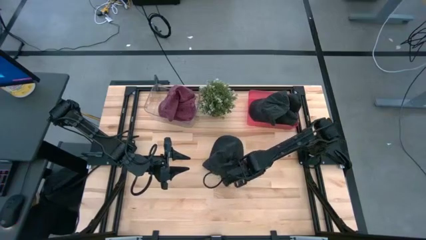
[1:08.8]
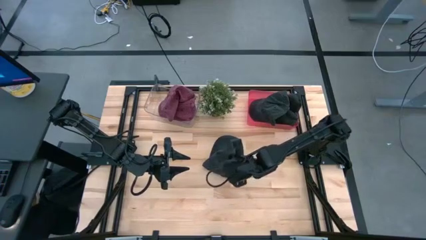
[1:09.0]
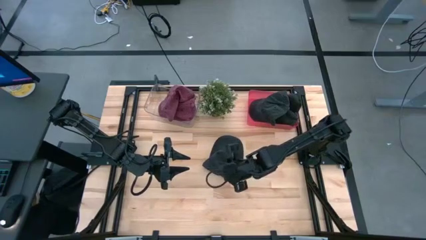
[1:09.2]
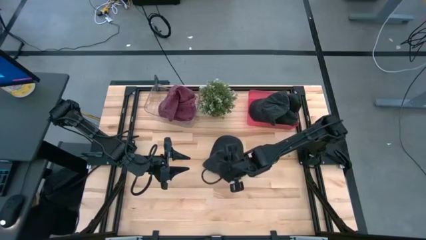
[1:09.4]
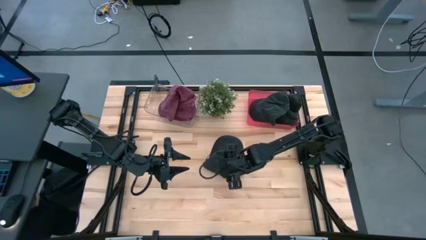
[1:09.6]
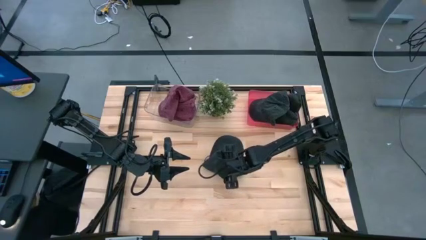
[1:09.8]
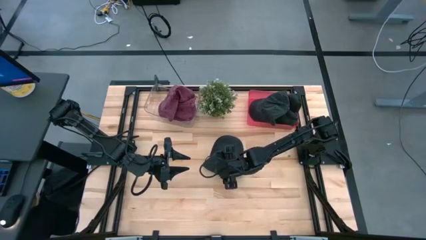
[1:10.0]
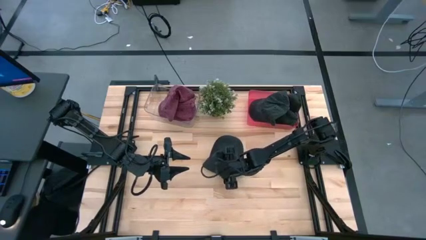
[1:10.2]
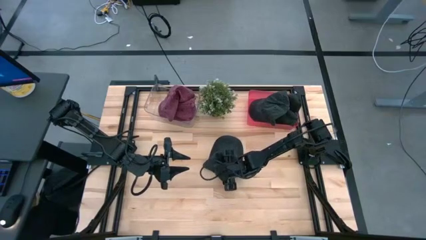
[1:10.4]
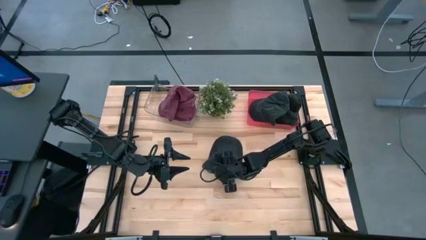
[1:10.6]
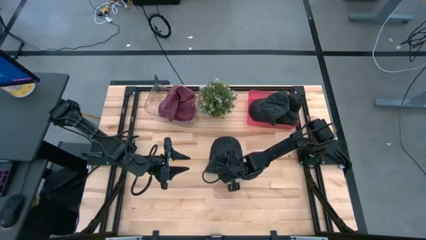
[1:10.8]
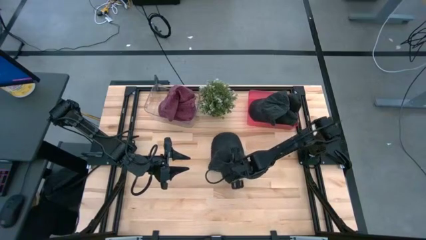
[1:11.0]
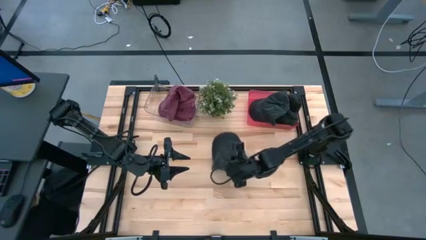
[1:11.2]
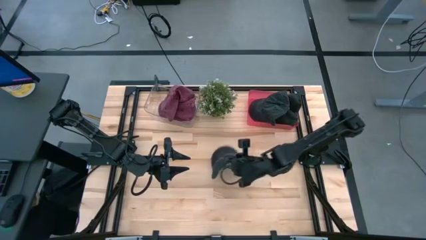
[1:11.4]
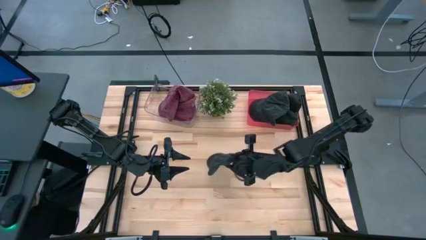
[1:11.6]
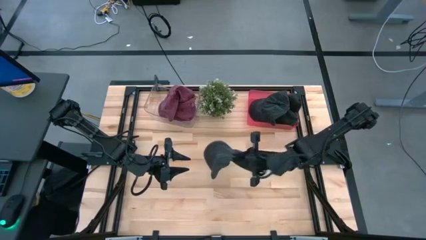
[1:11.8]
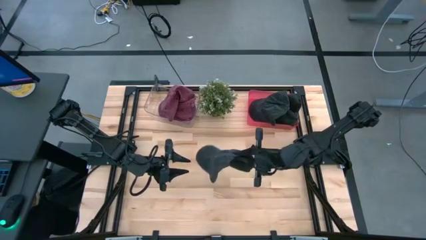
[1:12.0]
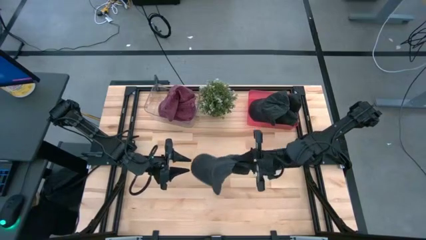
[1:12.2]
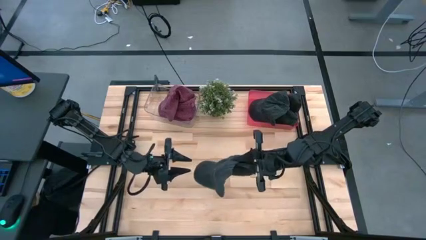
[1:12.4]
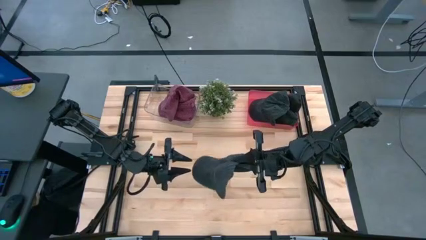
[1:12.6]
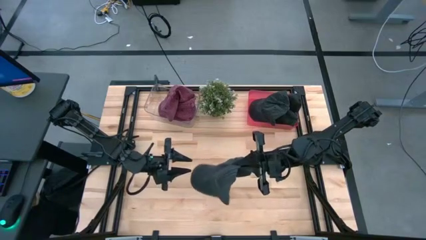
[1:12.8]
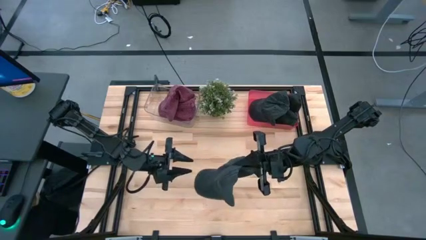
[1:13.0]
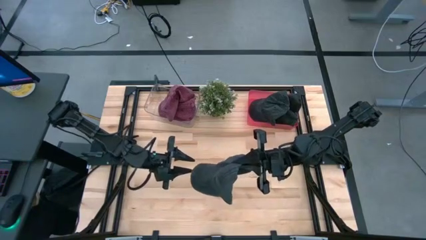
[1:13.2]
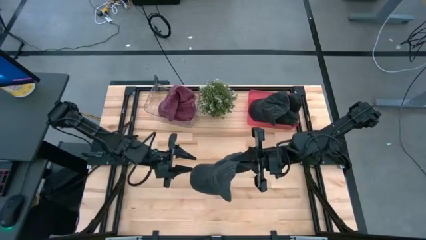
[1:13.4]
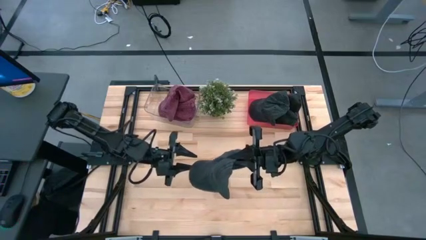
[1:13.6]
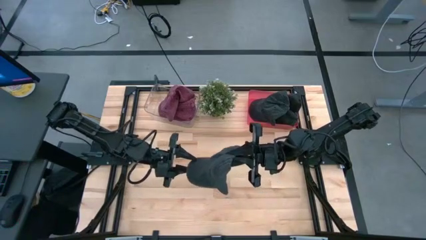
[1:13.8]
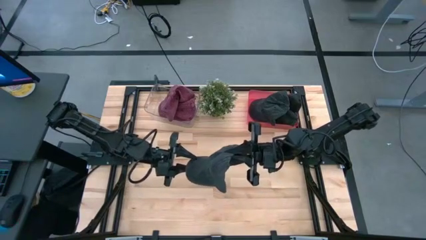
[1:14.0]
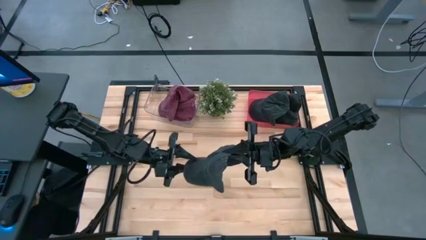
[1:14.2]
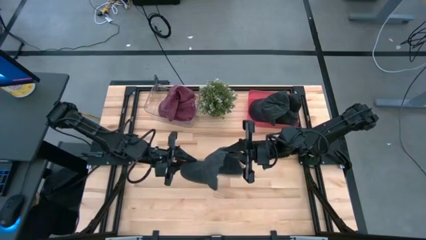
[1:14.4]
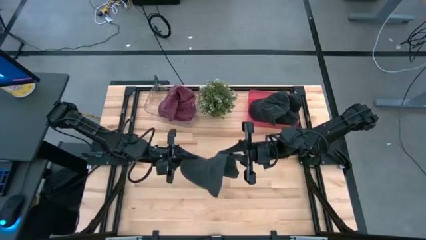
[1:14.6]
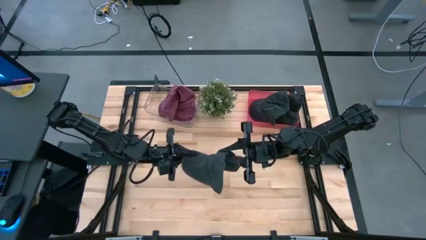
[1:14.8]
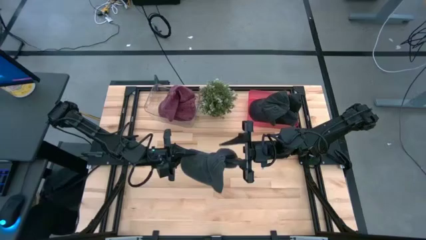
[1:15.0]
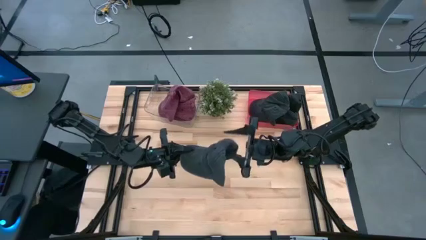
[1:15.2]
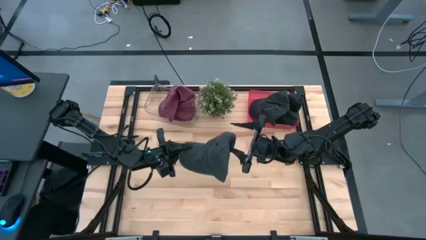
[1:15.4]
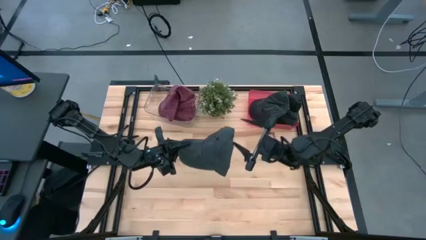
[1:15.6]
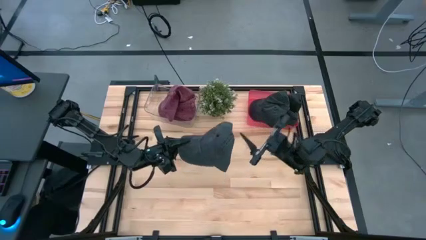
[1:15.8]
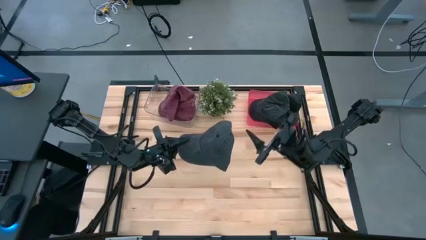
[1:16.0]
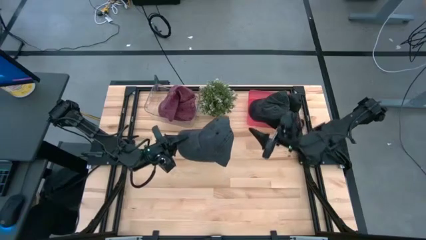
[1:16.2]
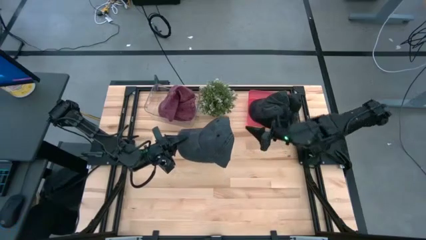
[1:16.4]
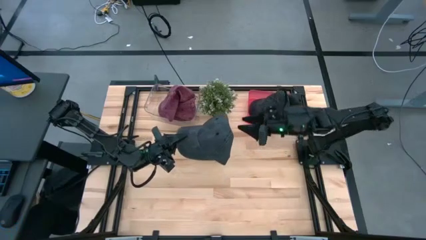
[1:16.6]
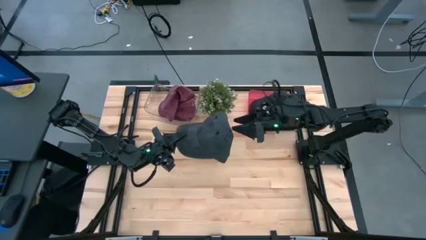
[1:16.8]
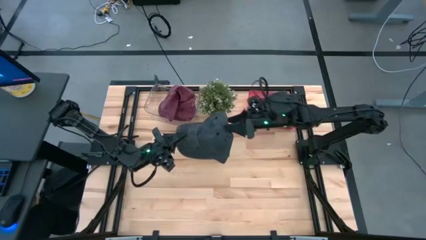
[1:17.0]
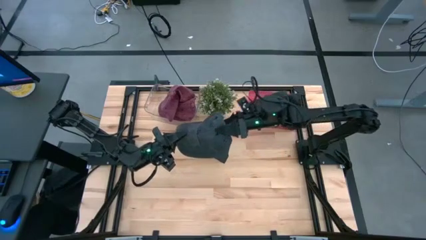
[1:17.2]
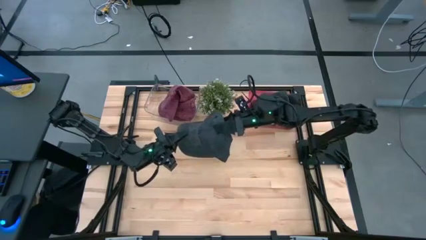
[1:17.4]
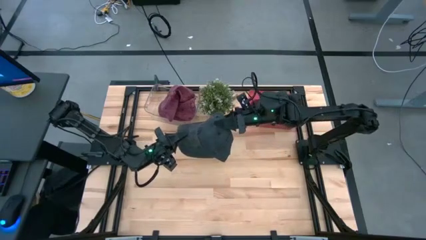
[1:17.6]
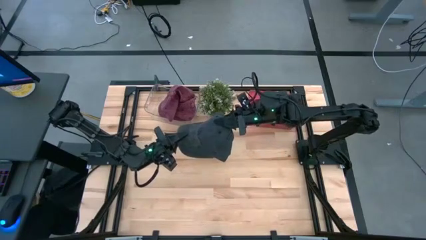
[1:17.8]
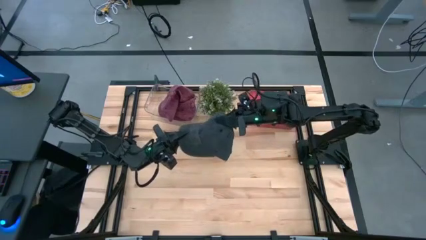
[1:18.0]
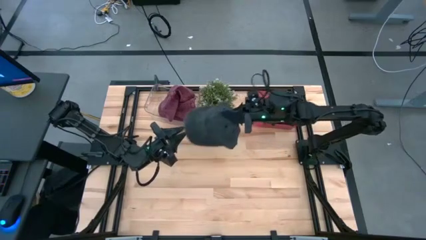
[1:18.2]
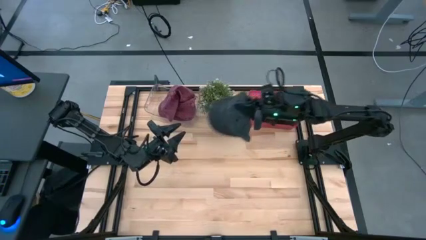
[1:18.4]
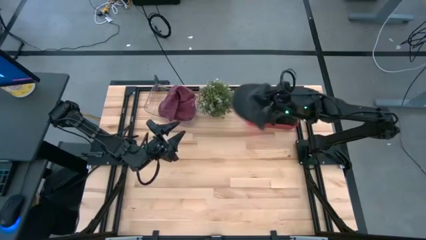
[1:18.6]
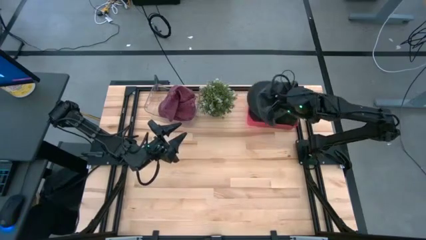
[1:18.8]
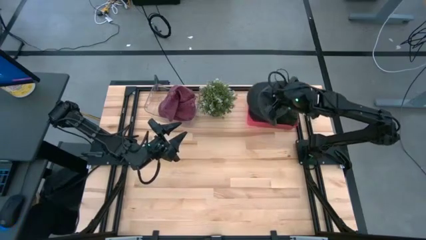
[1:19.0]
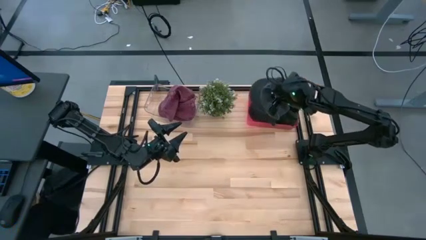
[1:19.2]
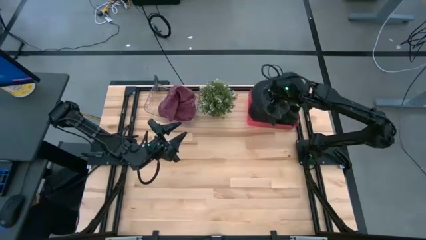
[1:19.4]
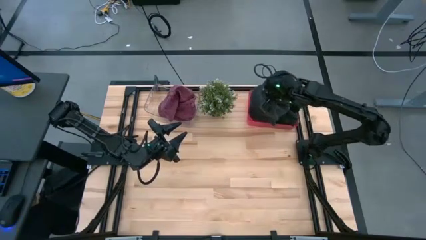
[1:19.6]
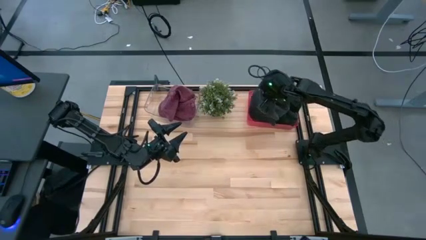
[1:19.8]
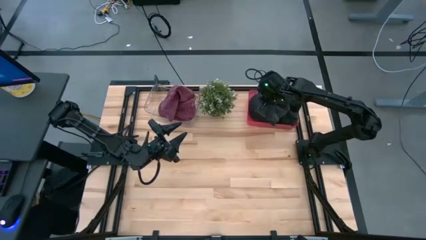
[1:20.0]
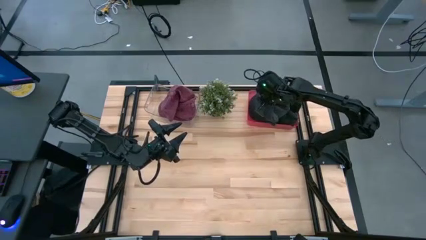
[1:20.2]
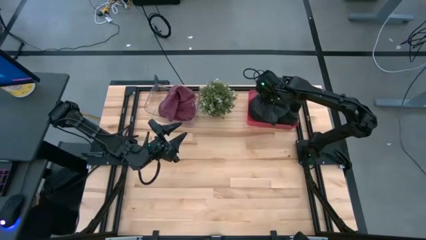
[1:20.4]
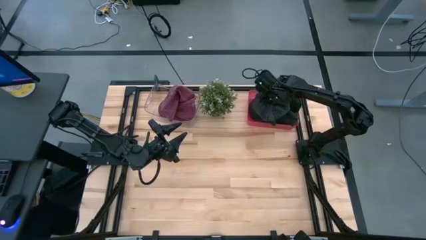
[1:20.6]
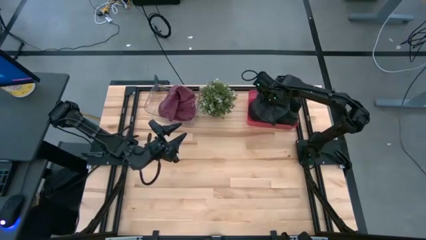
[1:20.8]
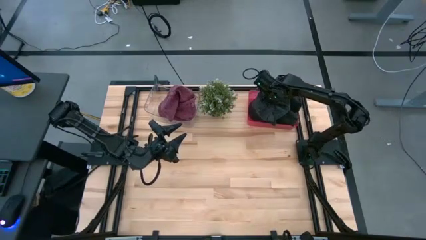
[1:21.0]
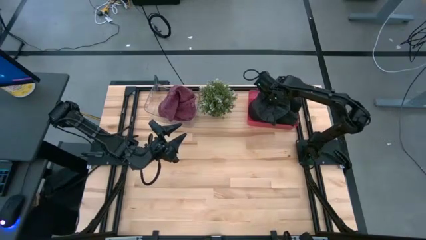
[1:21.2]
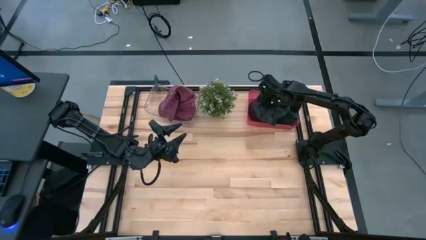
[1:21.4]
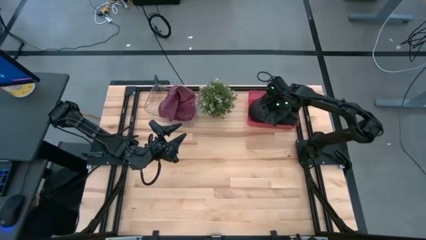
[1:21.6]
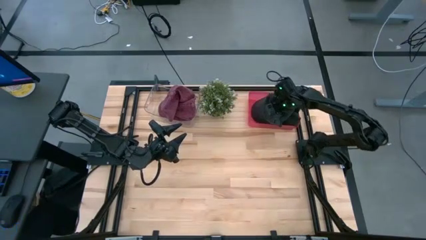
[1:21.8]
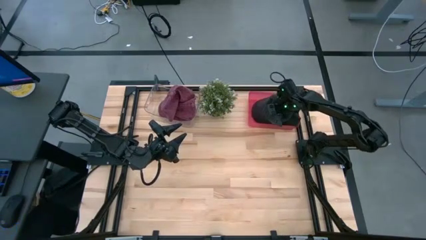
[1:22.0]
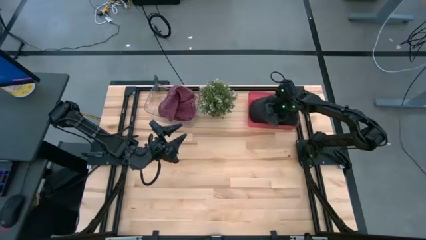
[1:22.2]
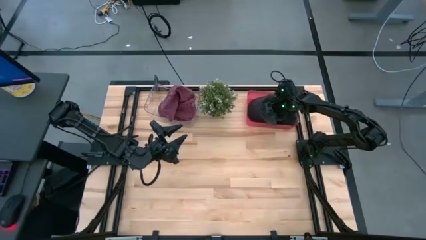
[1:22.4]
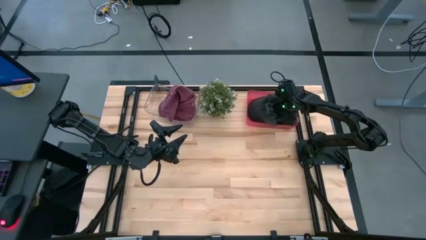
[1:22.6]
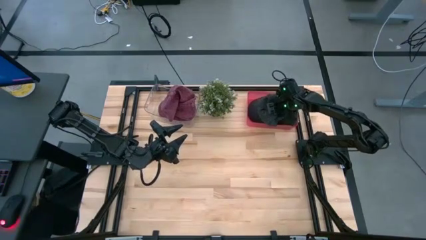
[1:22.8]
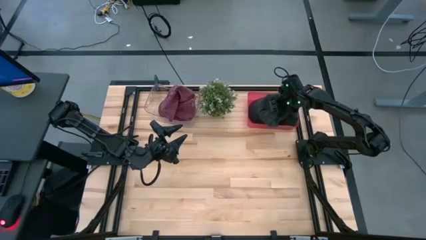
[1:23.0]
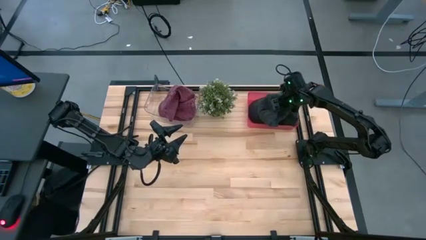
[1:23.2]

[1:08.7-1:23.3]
Task: Pick & Place hat
Put the black cap into the pink bin
